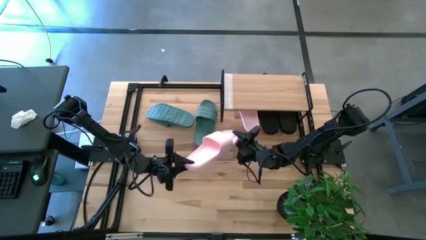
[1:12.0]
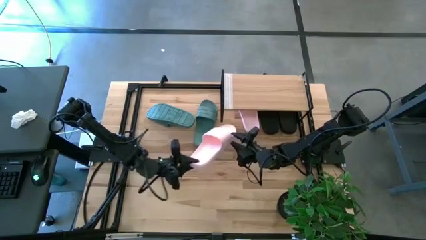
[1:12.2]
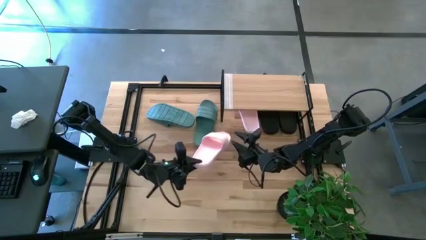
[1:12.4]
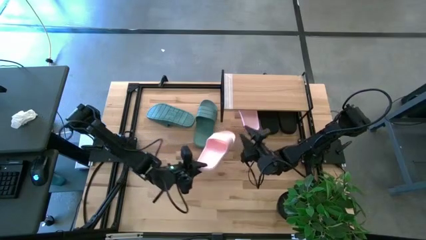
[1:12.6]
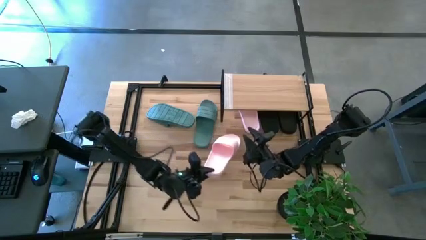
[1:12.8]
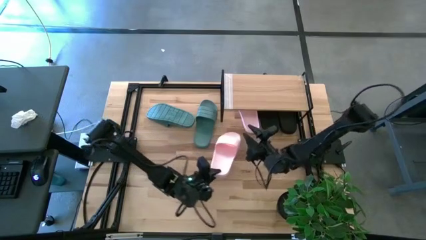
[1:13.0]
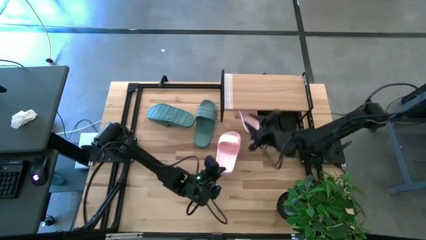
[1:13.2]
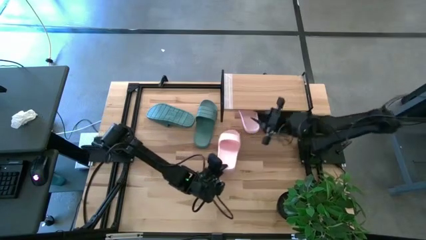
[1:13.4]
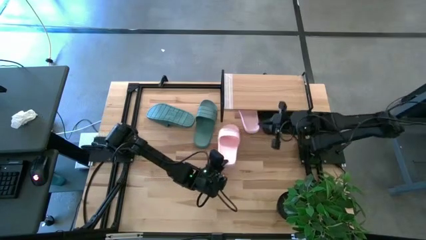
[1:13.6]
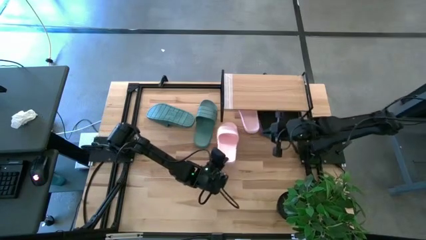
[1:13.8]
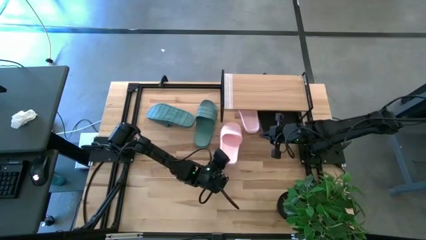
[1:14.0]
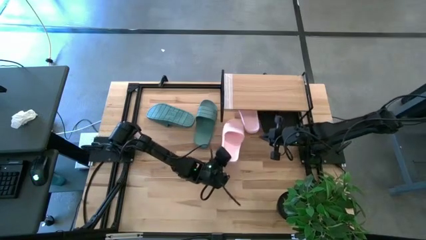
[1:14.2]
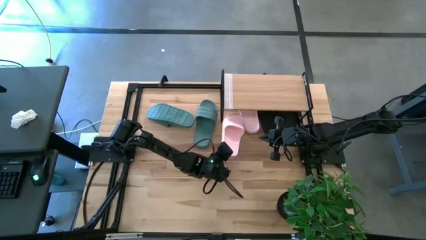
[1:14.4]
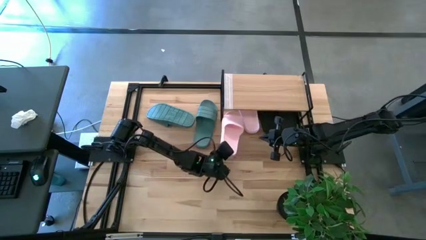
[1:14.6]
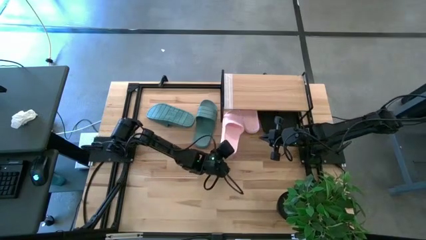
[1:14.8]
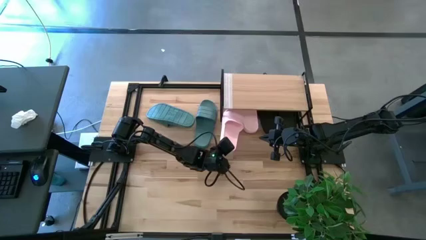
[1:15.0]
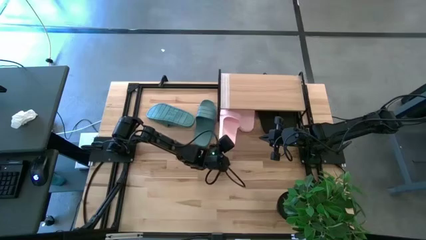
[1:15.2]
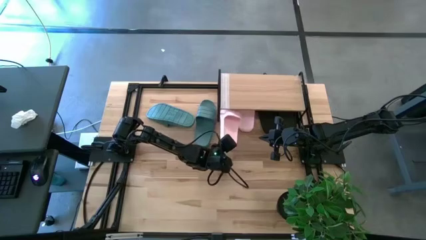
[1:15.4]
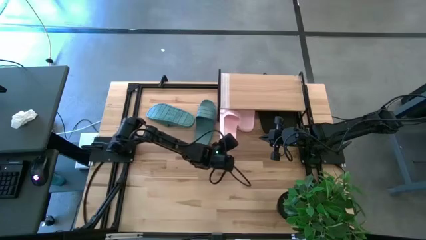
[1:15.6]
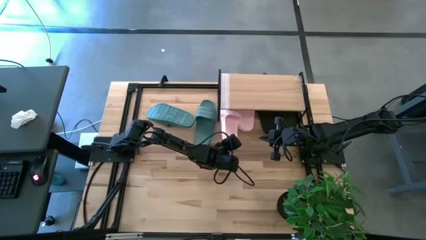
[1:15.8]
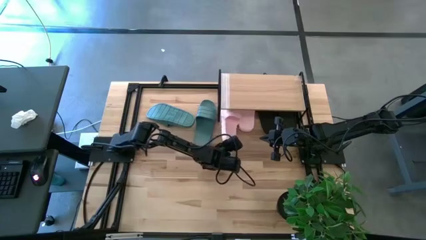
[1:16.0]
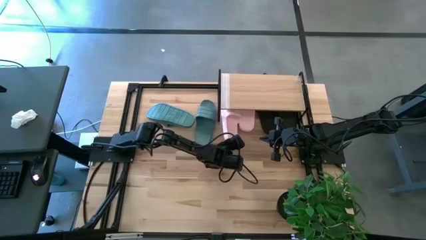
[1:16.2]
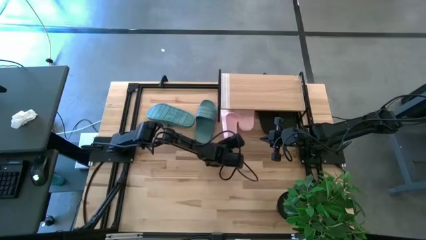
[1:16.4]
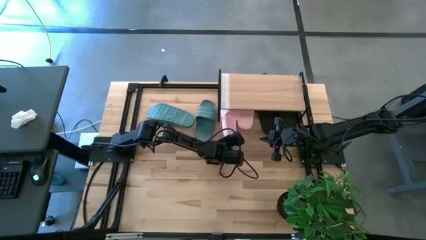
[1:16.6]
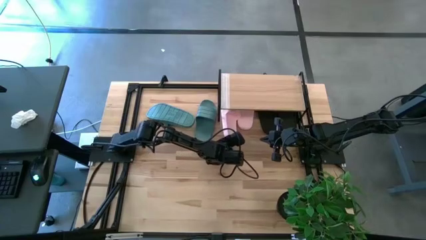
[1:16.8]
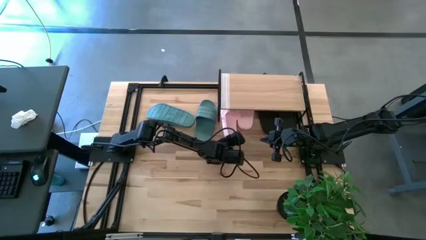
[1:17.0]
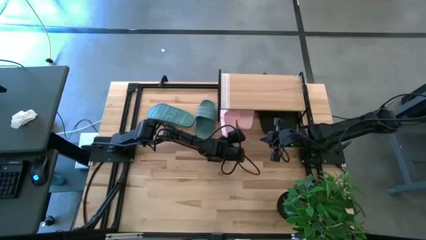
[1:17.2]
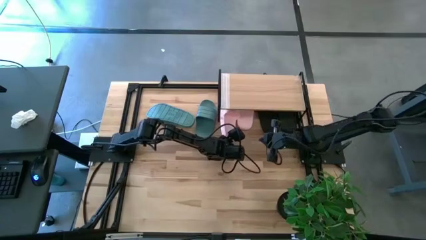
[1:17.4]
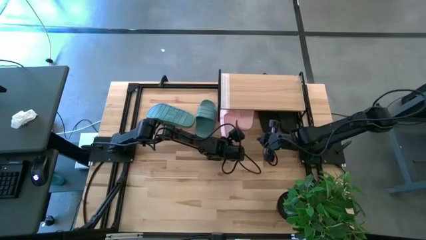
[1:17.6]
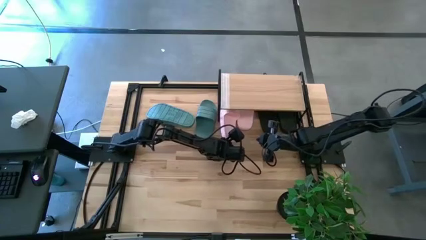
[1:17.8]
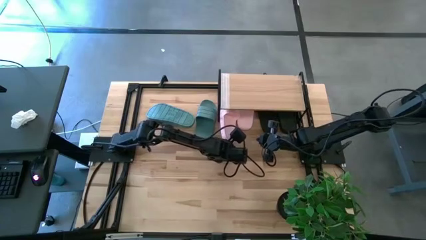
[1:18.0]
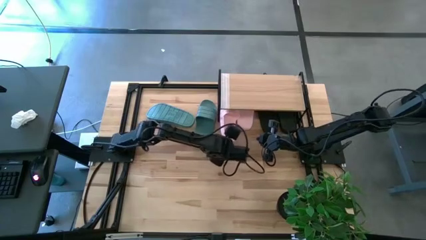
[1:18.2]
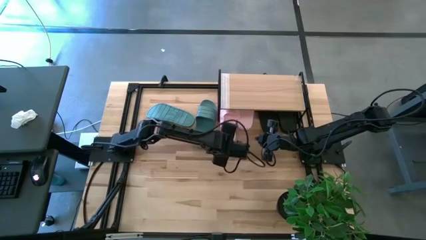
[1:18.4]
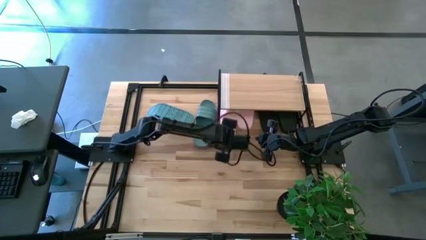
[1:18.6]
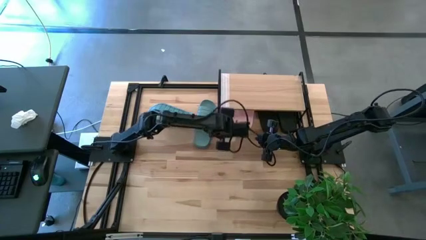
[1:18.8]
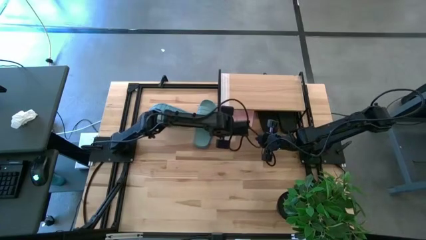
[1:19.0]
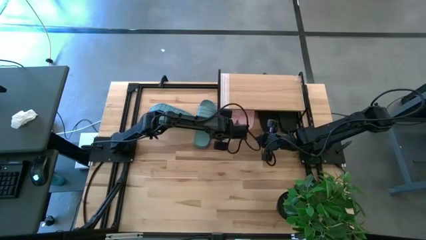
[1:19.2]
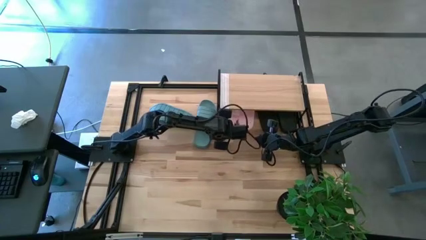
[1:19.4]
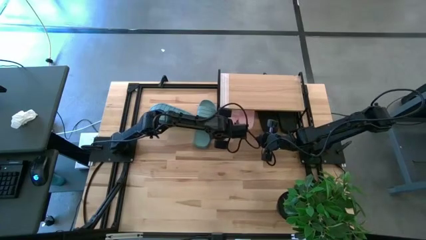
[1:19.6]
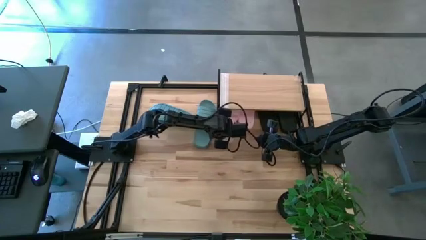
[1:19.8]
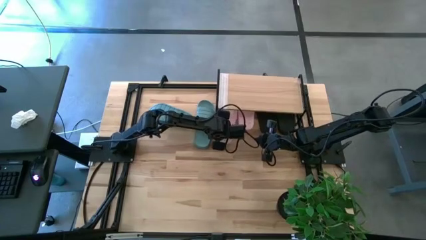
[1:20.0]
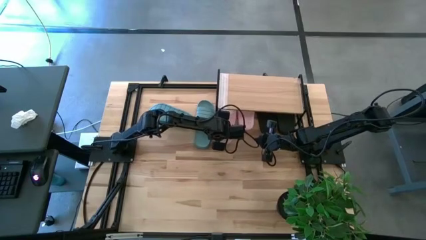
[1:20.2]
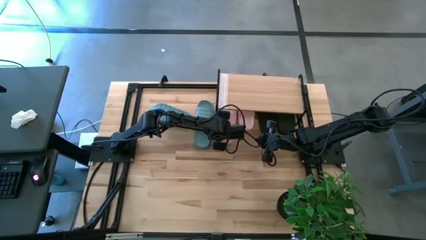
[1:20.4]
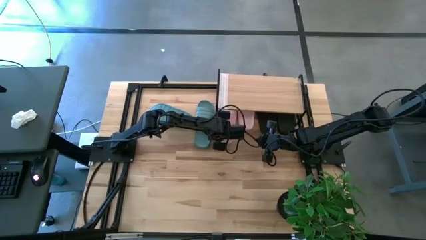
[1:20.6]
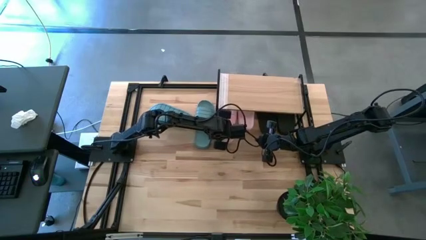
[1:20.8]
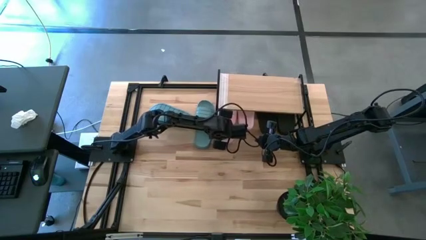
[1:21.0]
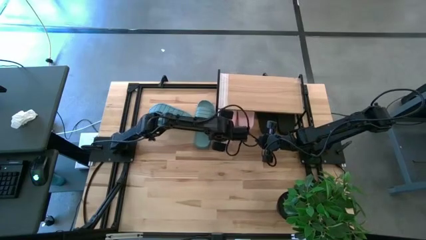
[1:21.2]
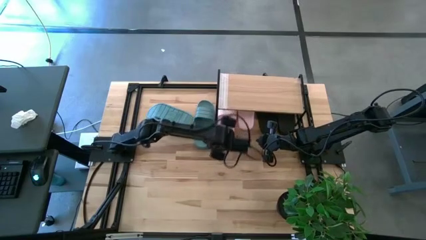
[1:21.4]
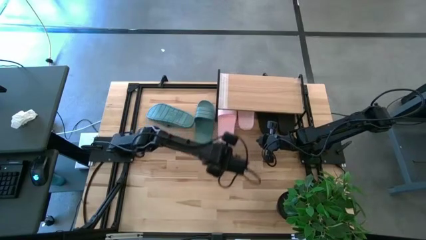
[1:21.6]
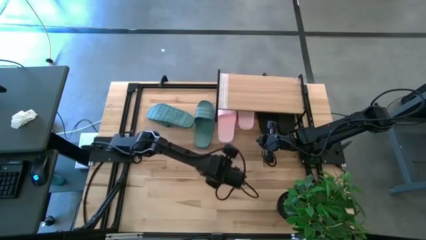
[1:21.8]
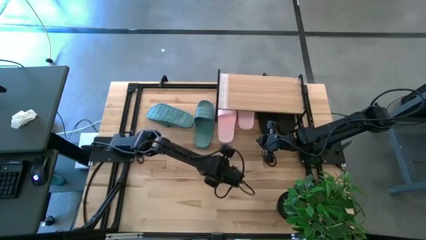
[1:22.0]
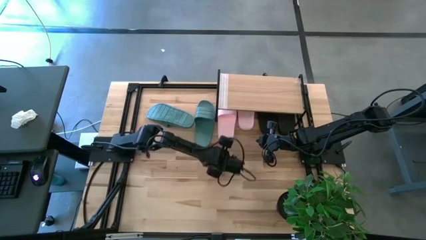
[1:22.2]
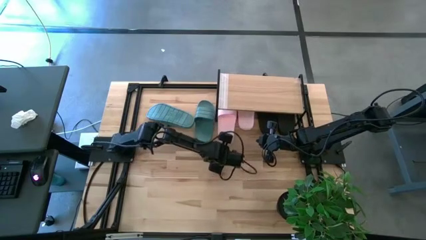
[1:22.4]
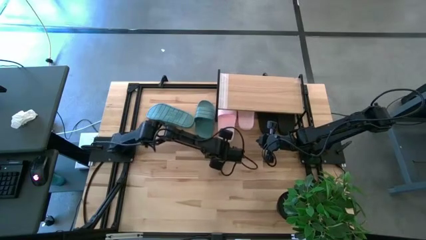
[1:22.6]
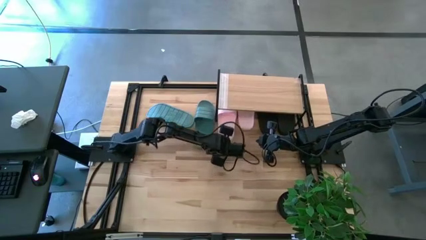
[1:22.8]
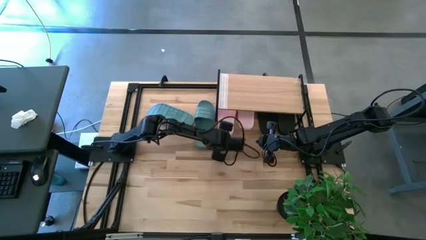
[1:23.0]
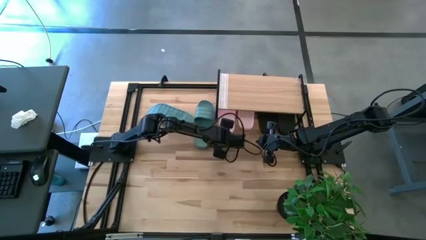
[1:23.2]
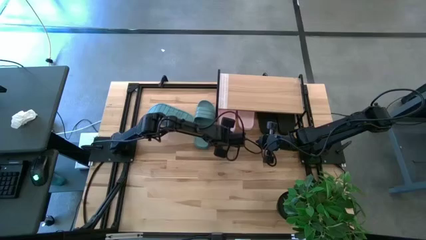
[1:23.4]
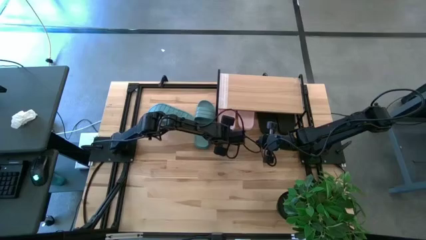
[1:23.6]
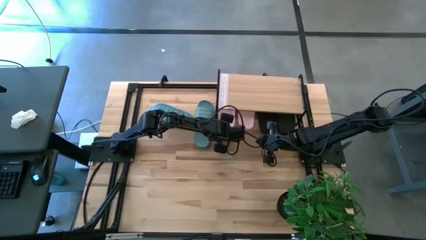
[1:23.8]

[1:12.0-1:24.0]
Task: Pick and place slides into the shelf
Put the pink slipper under the shelf
